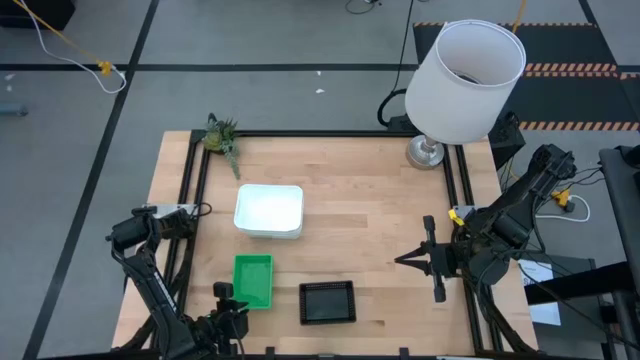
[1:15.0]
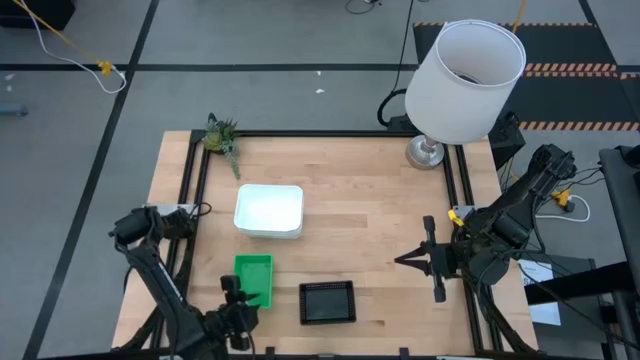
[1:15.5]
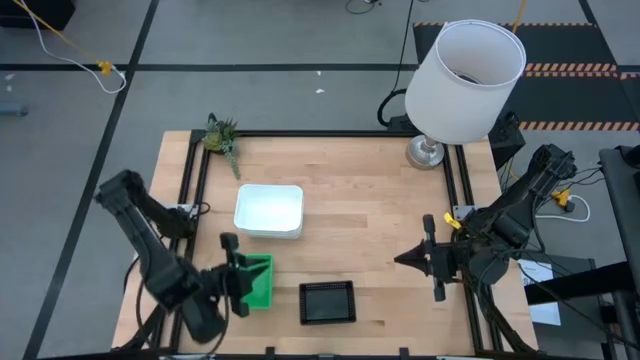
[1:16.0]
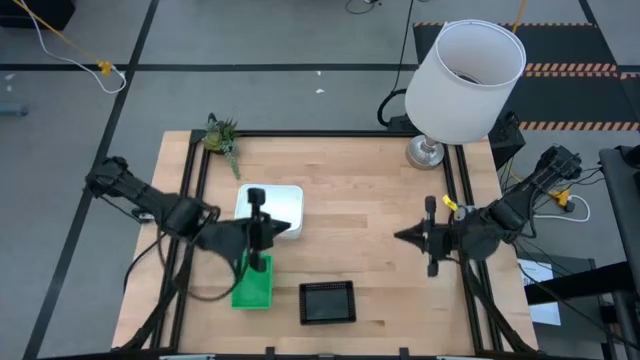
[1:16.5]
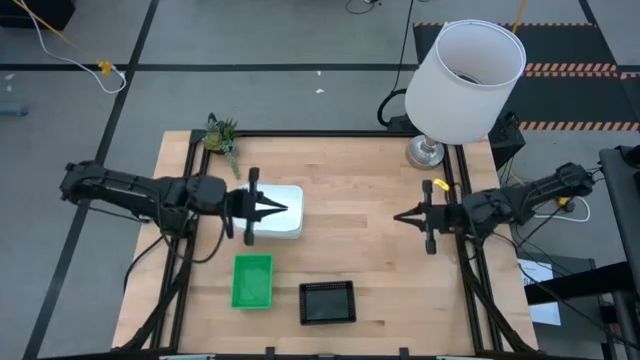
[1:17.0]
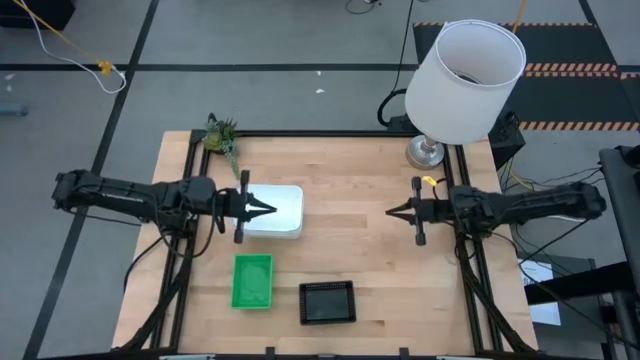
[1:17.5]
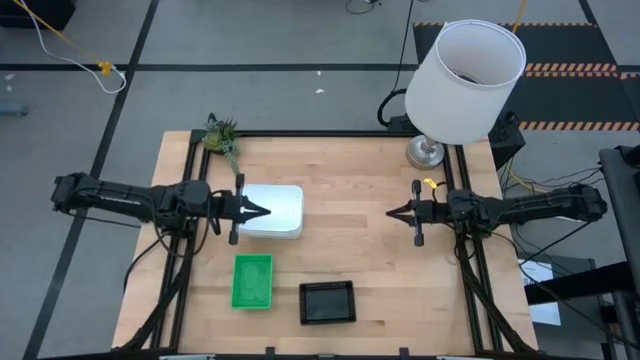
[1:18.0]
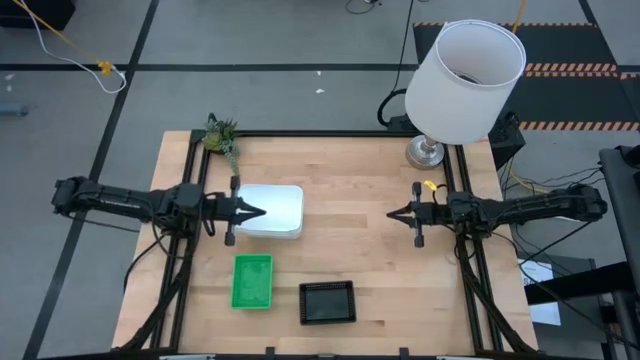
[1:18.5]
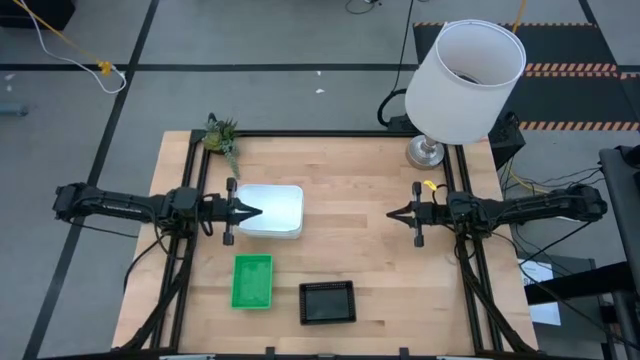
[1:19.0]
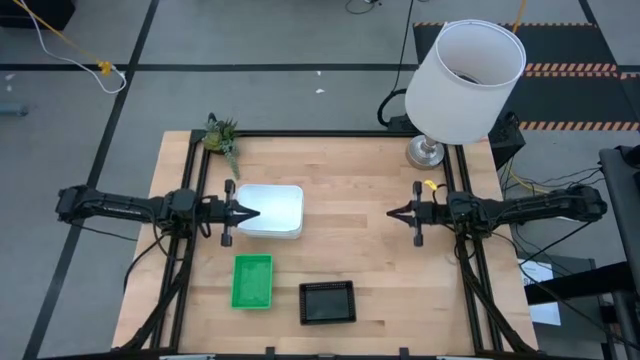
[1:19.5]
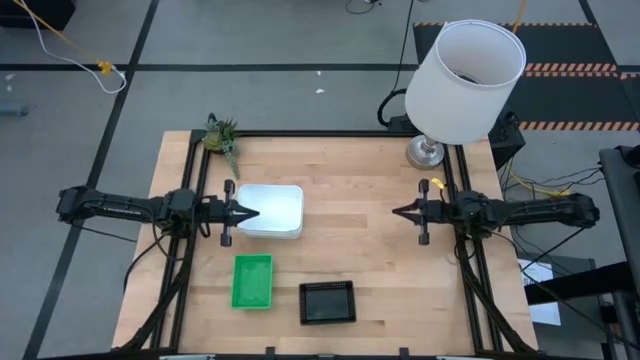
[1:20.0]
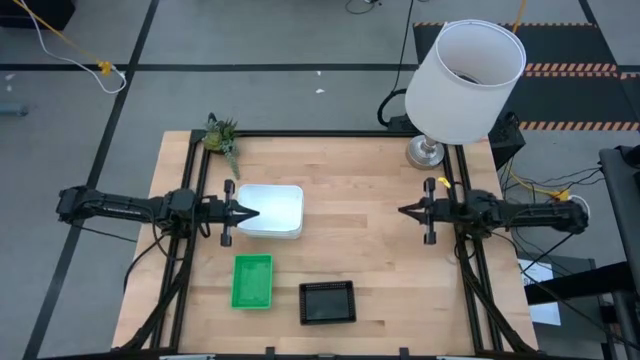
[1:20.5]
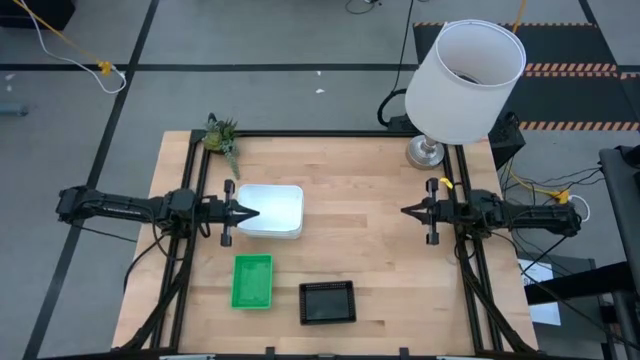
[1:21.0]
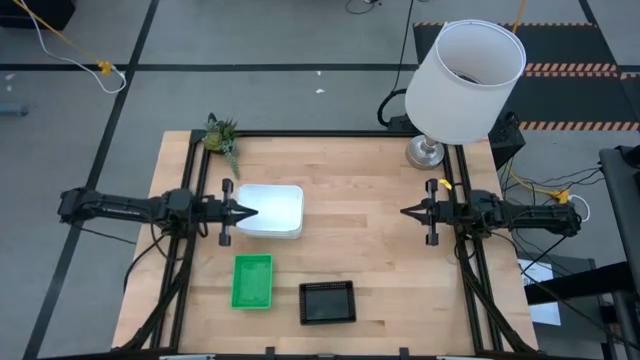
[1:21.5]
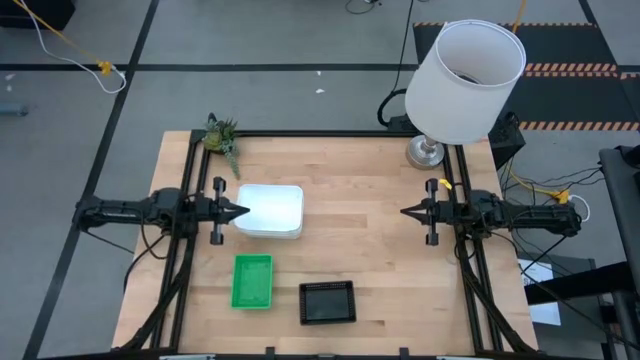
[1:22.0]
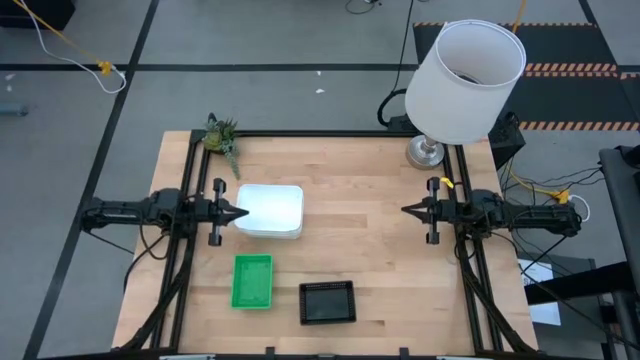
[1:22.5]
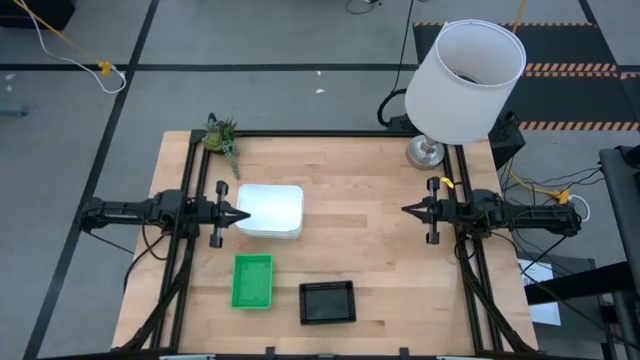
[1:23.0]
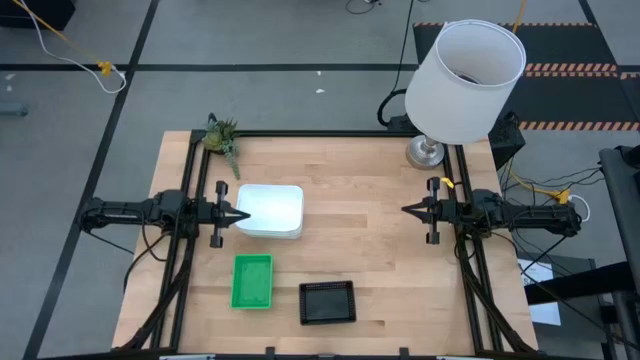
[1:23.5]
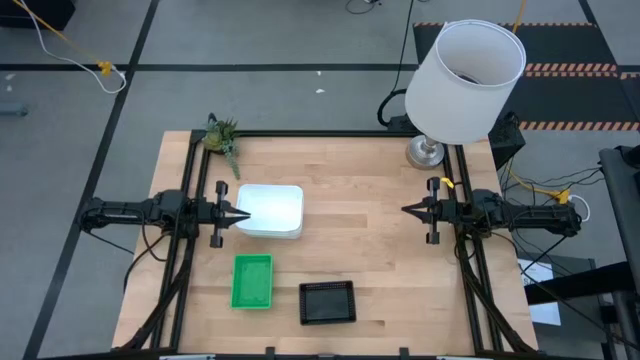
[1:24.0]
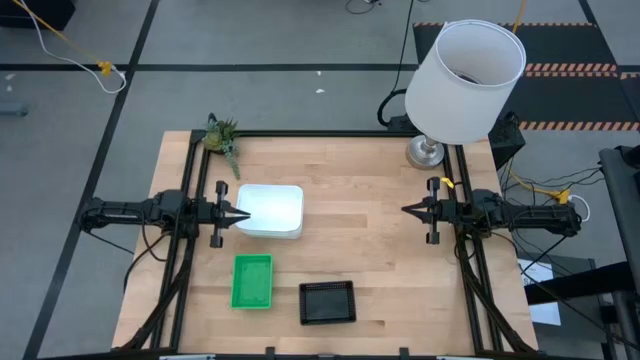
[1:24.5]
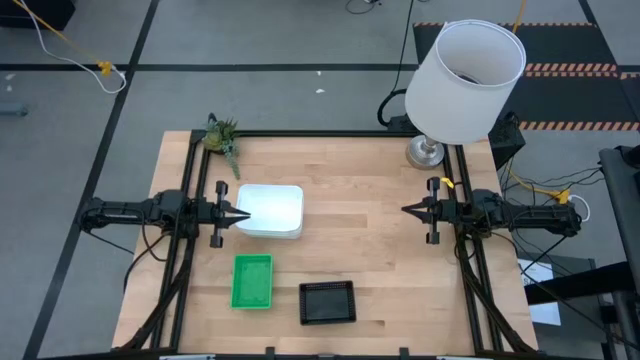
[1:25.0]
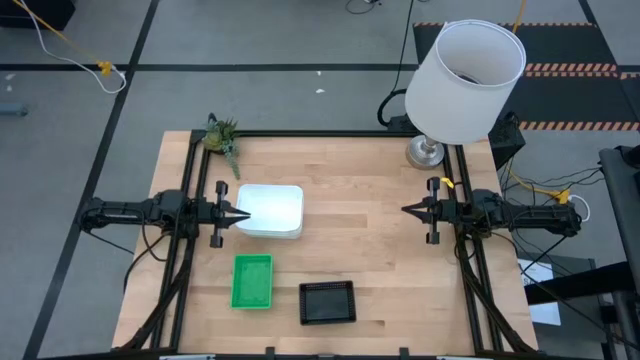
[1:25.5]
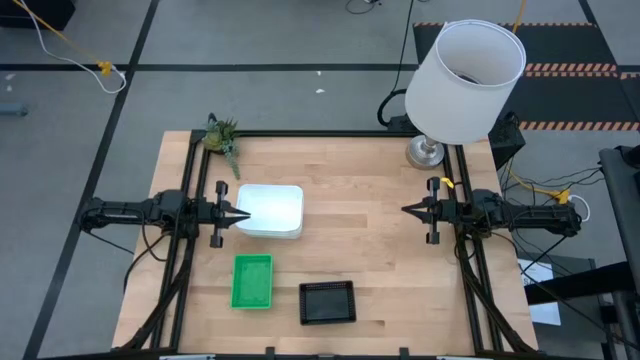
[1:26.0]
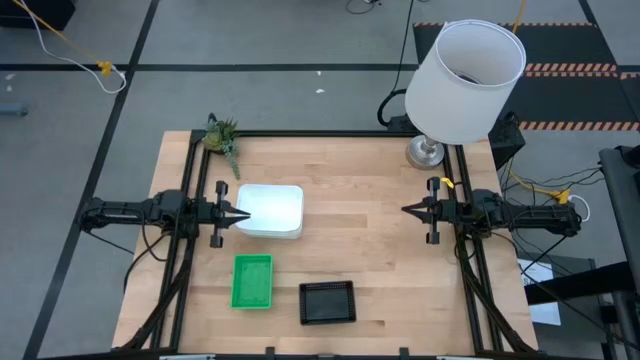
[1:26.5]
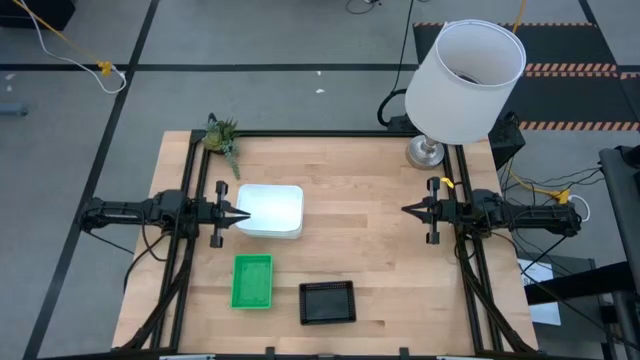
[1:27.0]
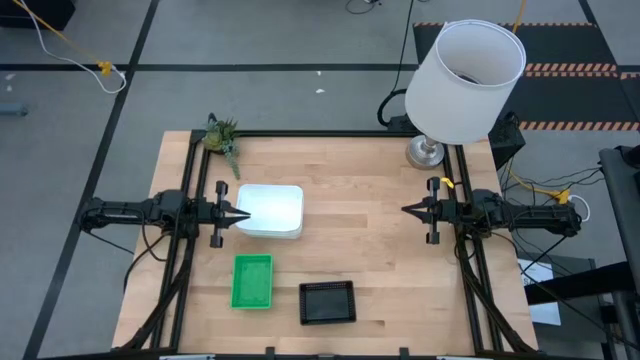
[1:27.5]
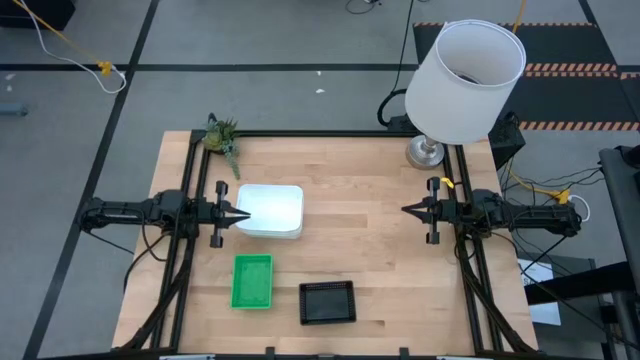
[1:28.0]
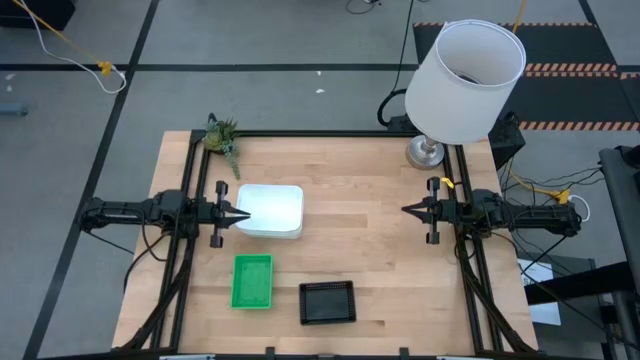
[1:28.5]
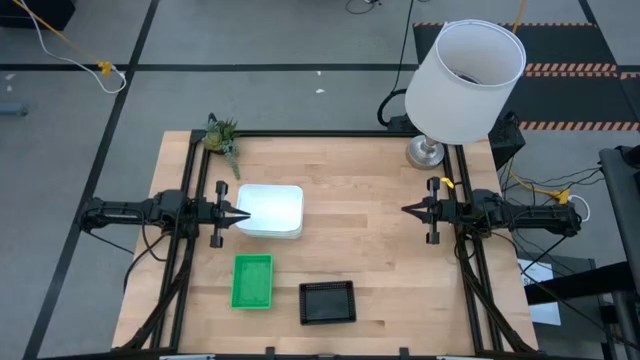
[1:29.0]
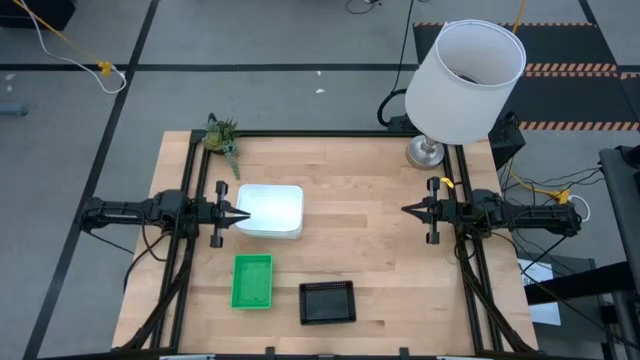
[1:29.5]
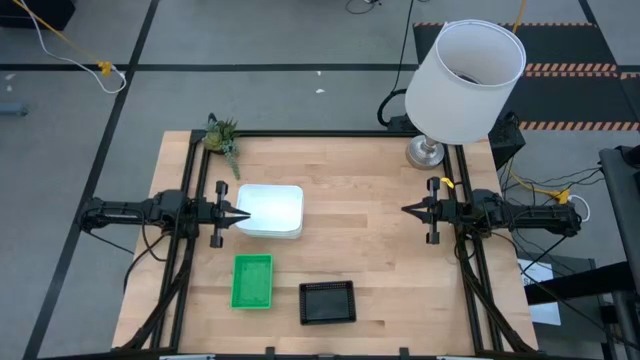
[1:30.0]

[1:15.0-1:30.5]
Return to Home Position
